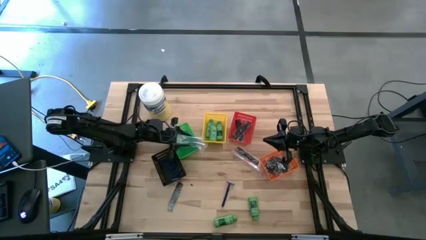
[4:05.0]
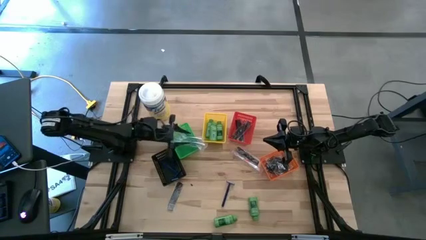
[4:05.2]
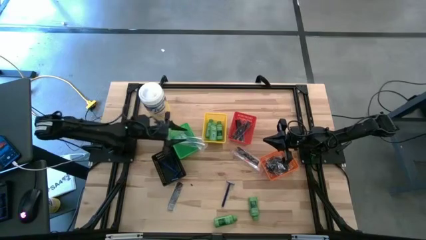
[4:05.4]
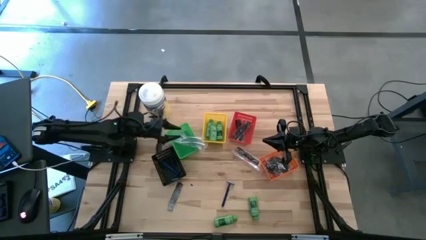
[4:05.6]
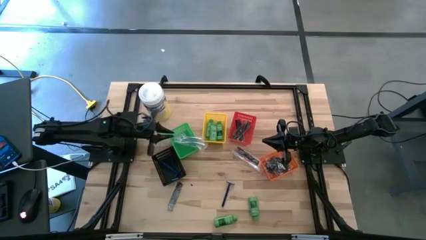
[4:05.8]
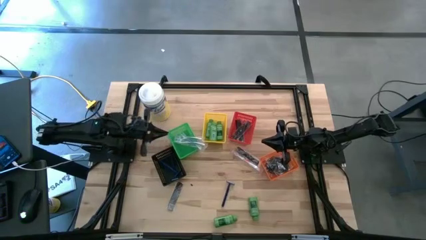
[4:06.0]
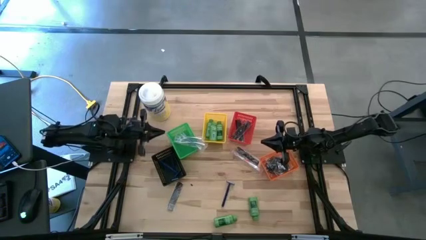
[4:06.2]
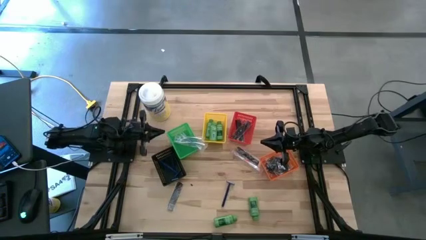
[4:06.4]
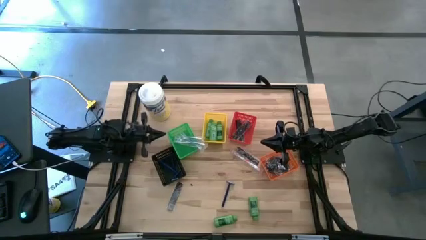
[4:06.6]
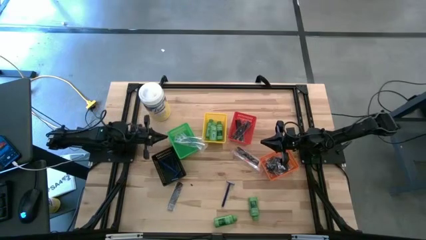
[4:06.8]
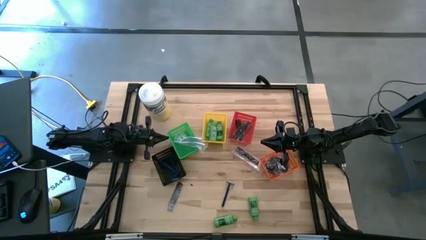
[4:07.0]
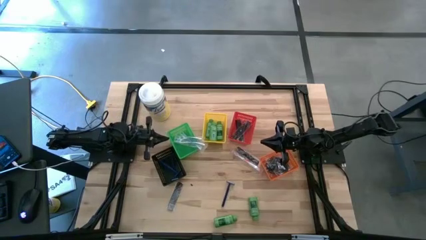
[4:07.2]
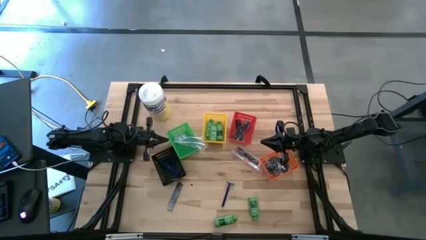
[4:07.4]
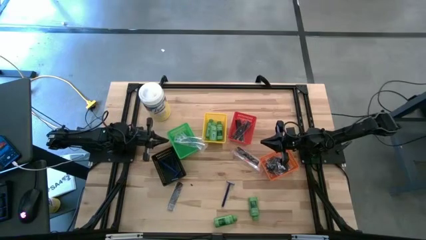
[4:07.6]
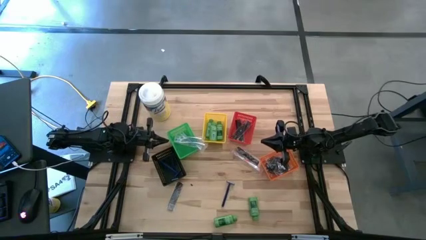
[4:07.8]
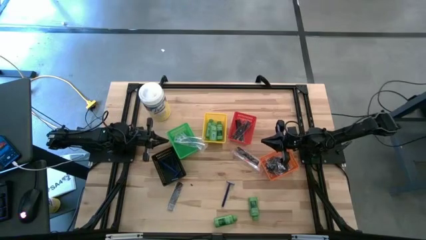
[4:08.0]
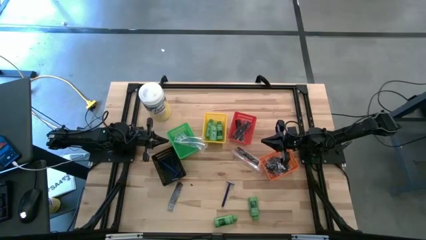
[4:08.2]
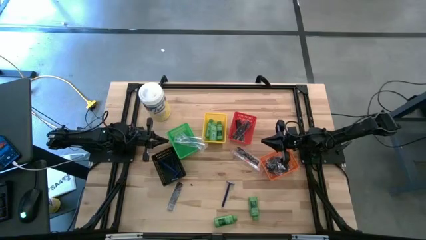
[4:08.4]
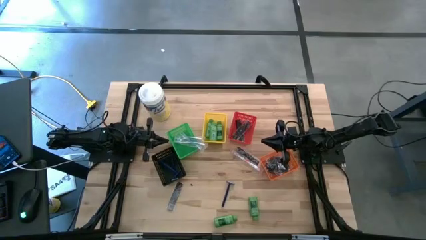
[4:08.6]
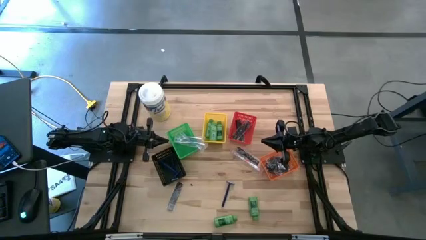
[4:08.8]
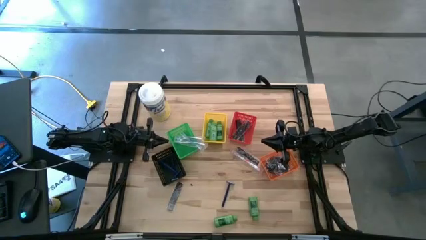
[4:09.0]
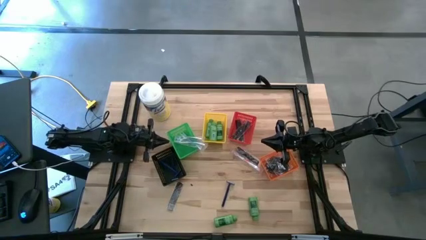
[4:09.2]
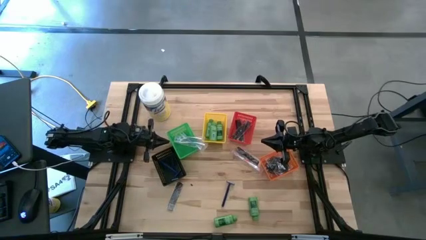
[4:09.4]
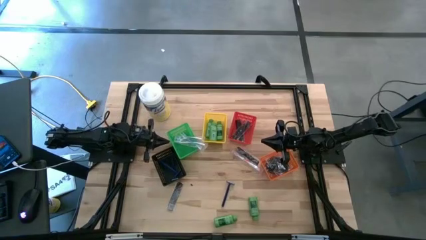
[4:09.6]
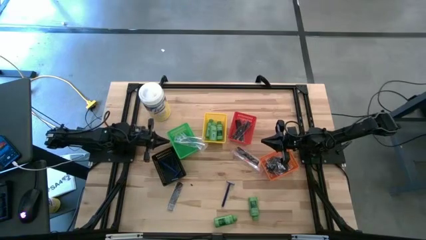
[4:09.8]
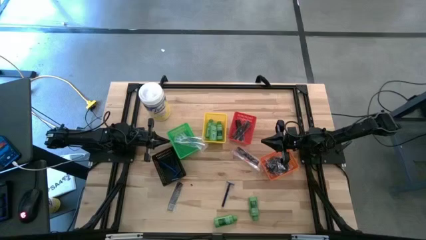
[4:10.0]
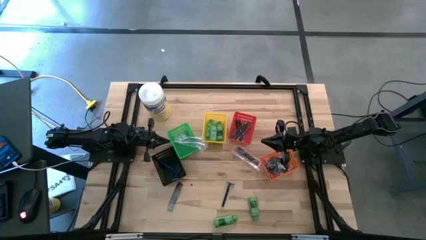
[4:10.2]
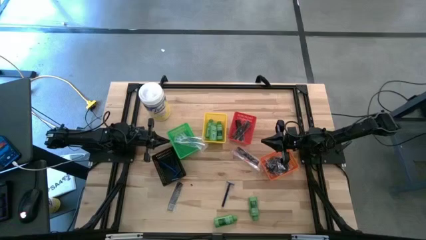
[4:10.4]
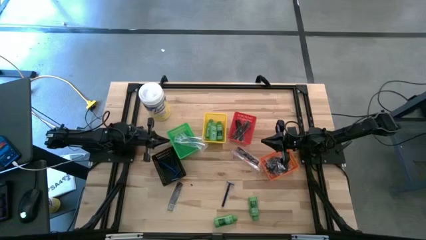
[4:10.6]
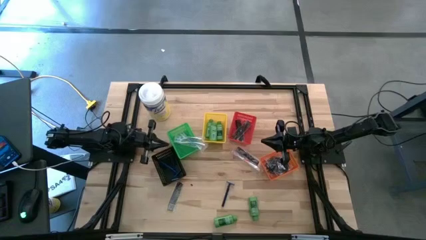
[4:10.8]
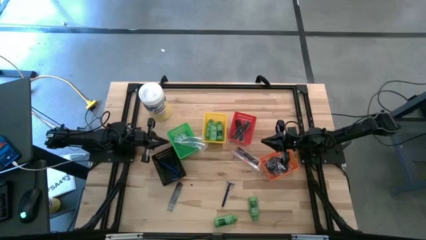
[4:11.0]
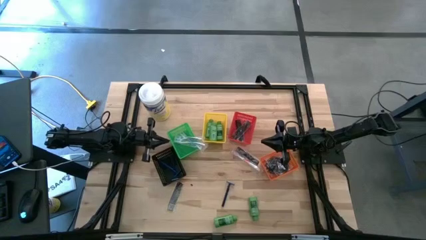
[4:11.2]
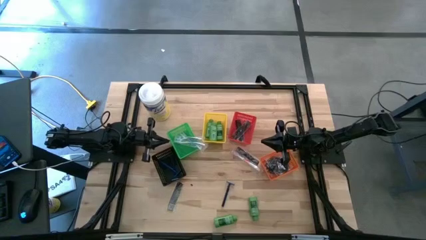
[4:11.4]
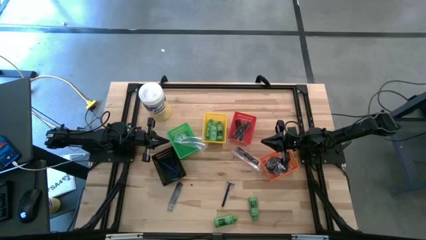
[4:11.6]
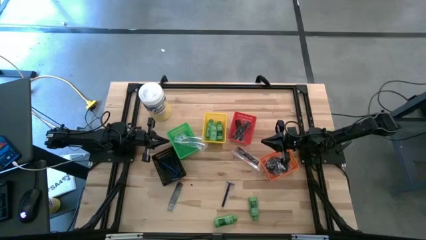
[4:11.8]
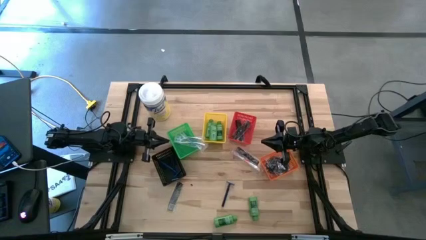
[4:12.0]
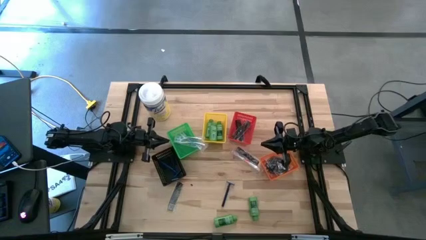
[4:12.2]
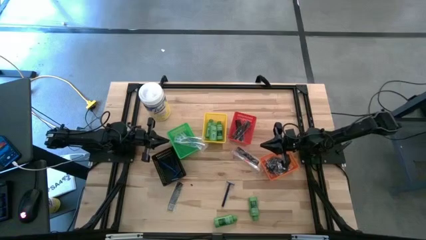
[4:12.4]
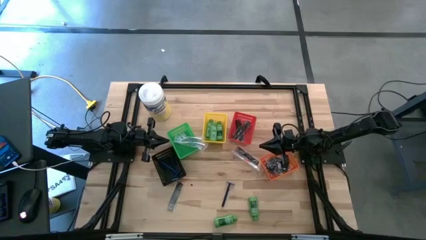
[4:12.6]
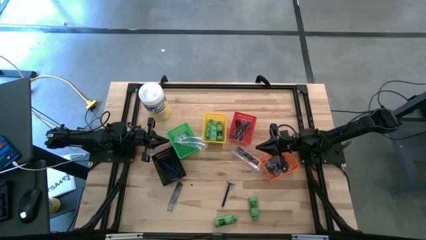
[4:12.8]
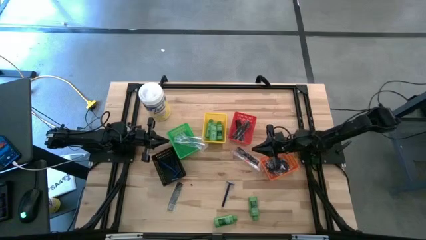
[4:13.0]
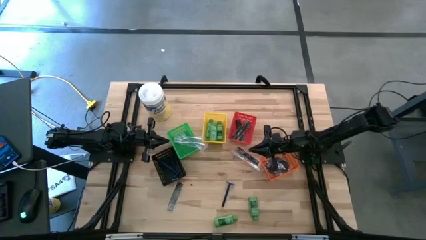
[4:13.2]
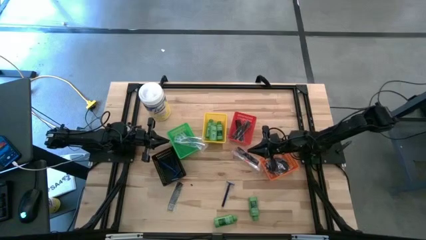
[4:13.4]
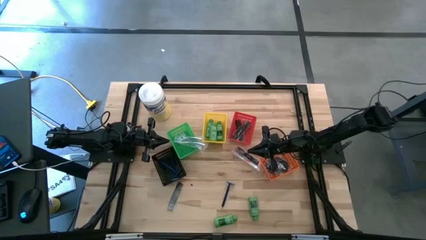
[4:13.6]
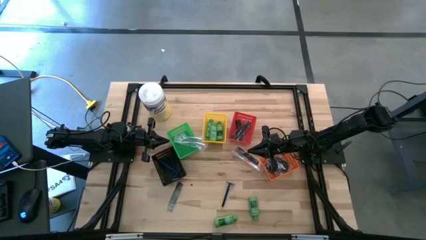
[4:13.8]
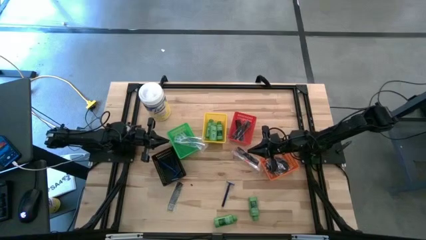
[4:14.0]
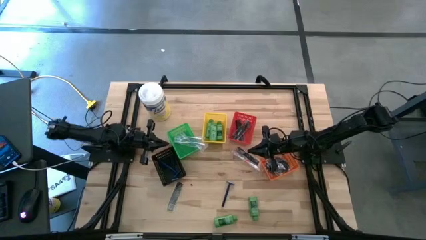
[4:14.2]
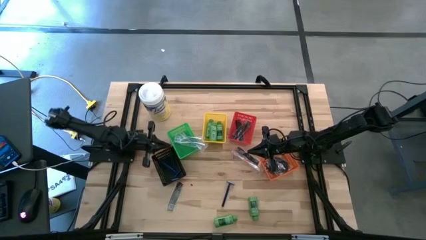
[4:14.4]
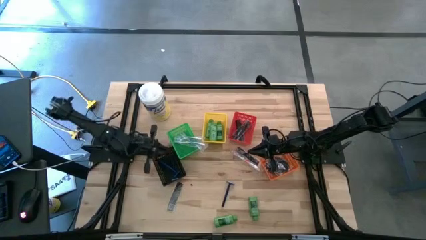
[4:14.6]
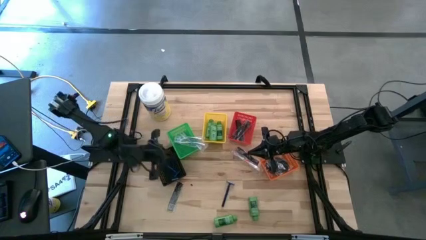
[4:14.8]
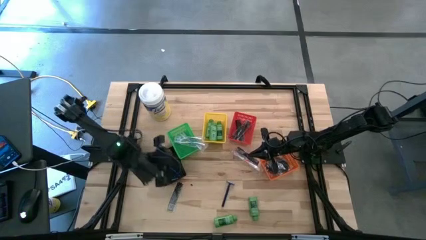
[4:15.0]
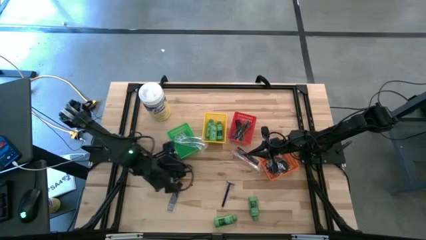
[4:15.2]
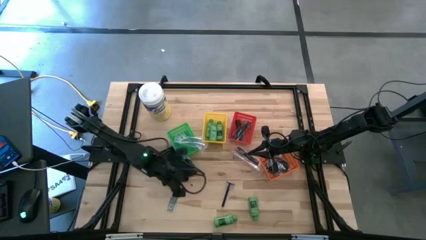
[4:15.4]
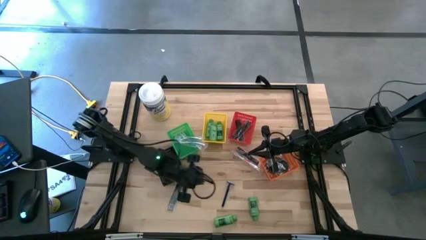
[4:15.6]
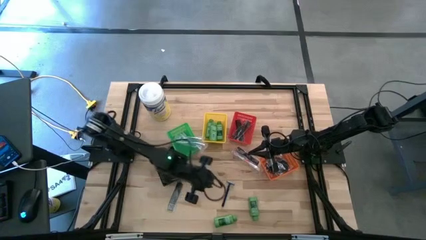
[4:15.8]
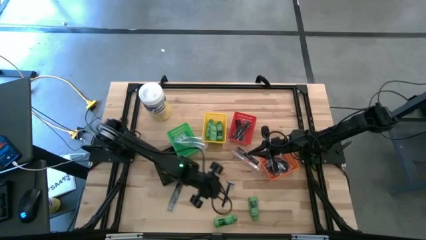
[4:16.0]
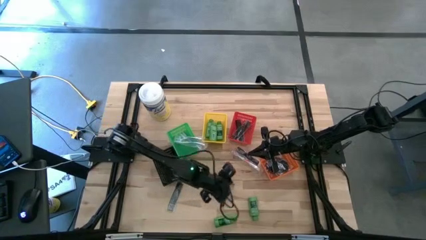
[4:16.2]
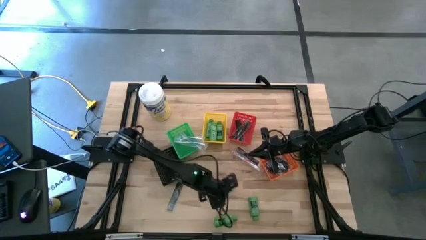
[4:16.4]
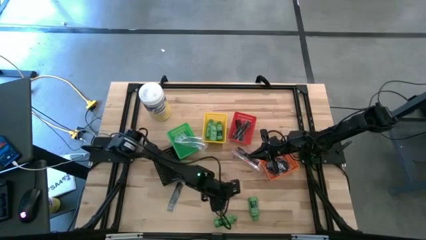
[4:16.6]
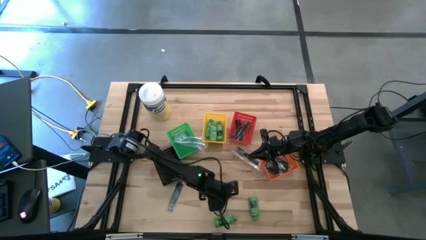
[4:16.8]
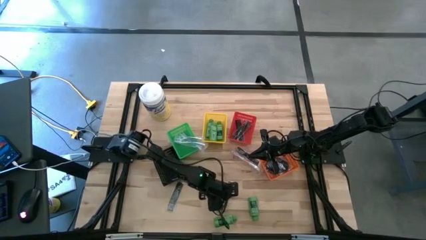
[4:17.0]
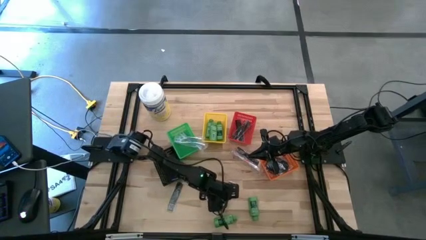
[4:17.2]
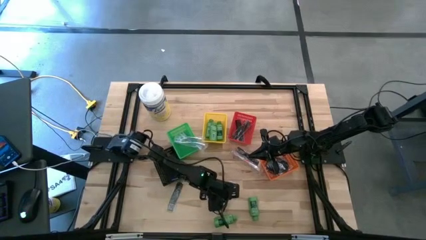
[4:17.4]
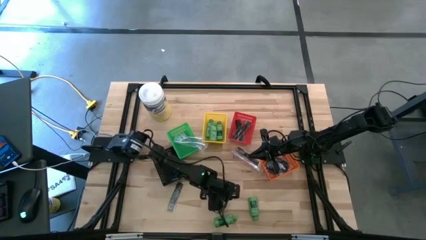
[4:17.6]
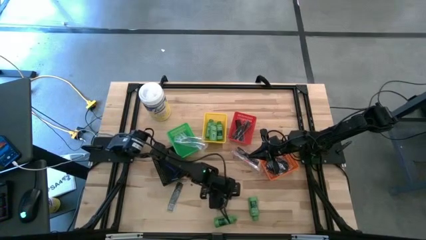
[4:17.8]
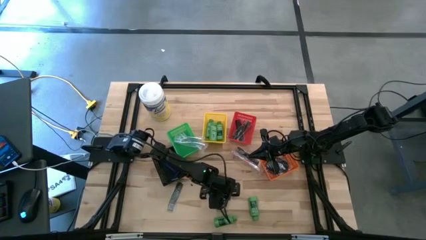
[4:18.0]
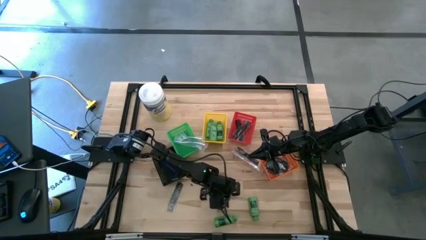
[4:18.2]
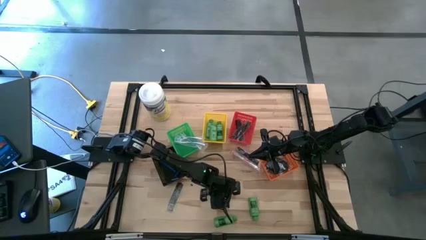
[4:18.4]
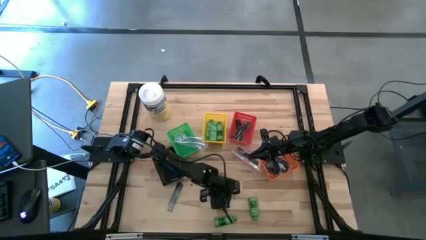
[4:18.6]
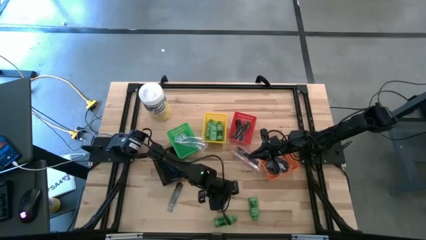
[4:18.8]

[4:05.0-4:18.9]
Task: Pick & Place Travel size toiletries
Put the blue razor into the black bin
